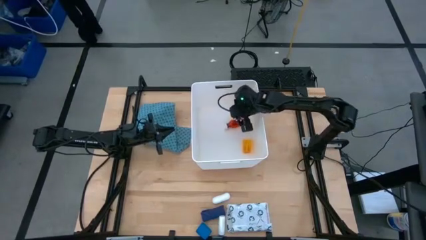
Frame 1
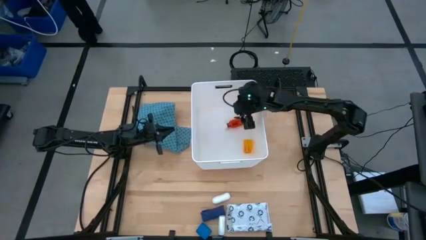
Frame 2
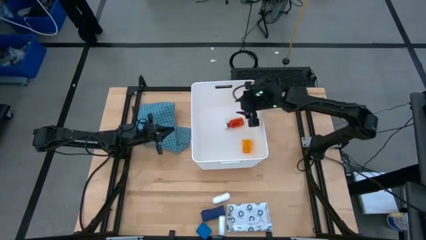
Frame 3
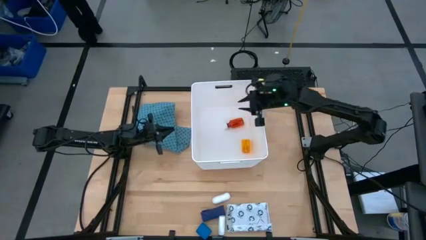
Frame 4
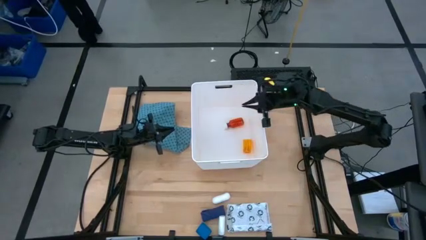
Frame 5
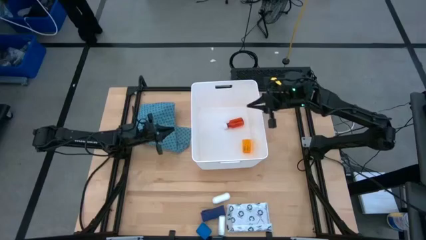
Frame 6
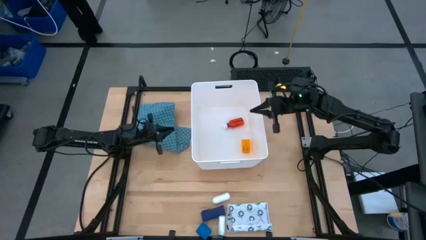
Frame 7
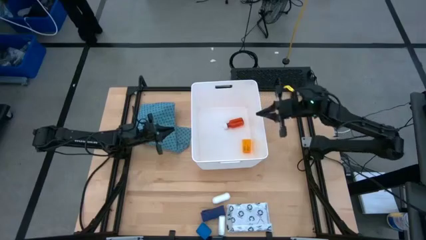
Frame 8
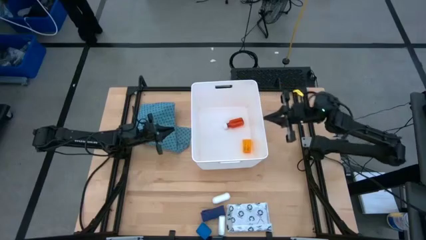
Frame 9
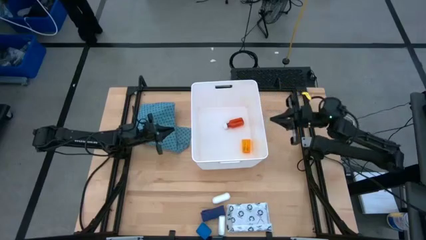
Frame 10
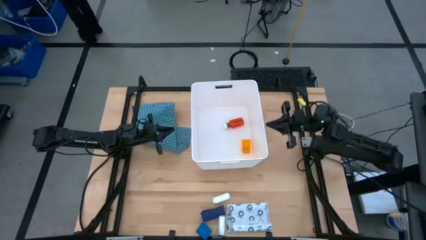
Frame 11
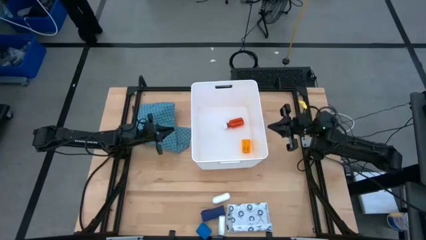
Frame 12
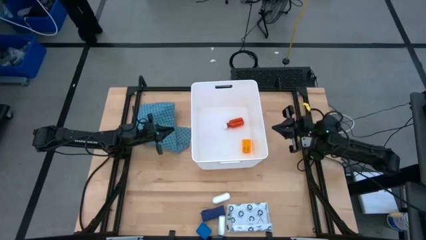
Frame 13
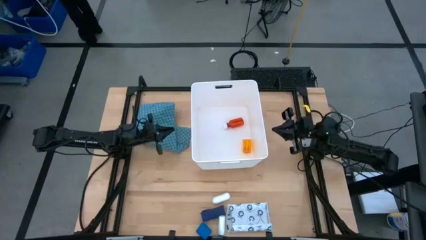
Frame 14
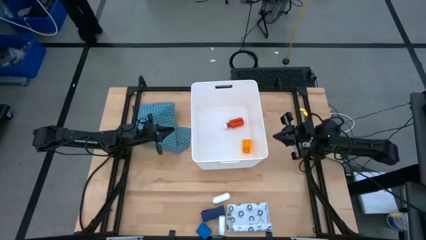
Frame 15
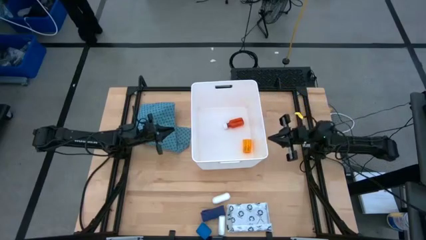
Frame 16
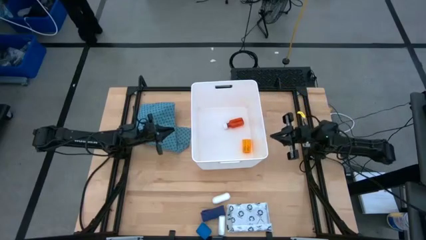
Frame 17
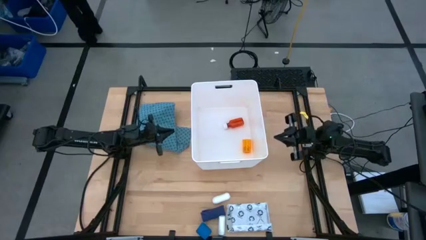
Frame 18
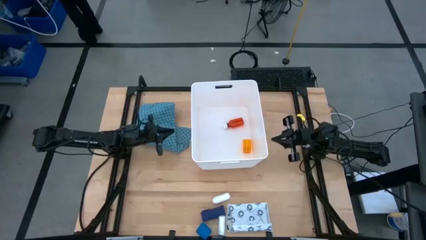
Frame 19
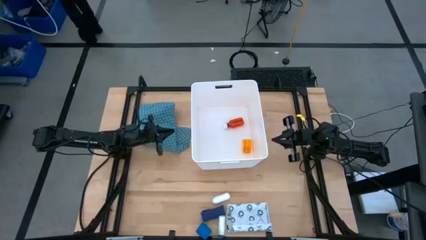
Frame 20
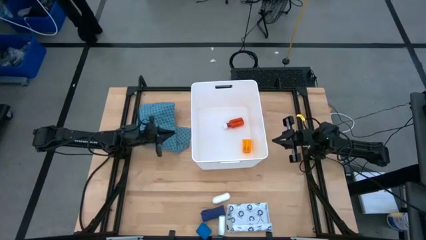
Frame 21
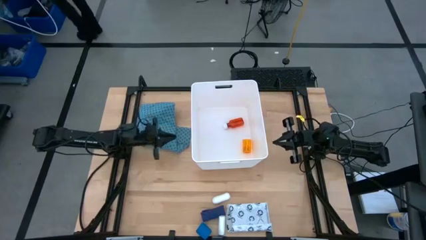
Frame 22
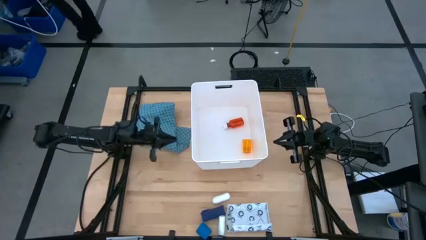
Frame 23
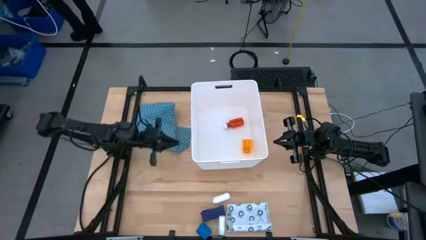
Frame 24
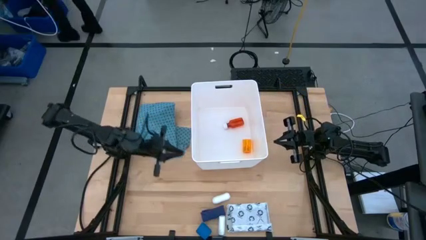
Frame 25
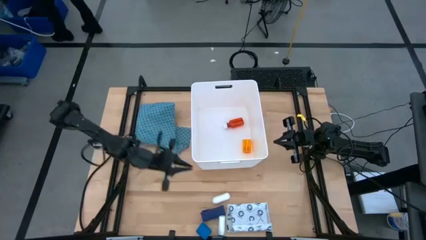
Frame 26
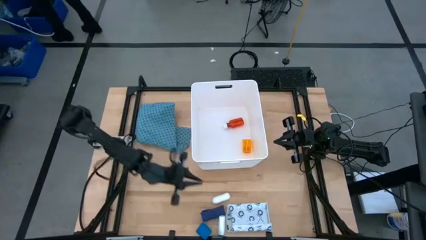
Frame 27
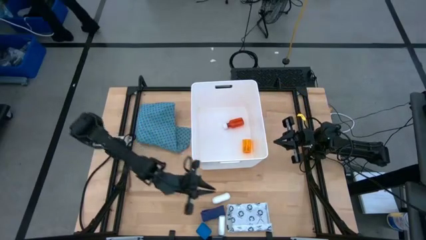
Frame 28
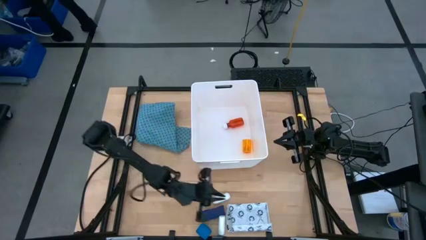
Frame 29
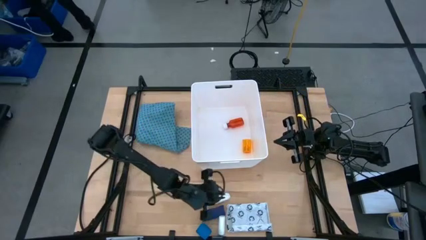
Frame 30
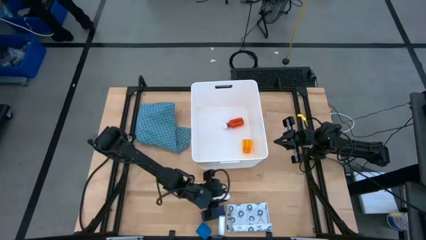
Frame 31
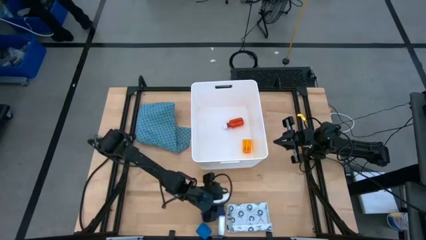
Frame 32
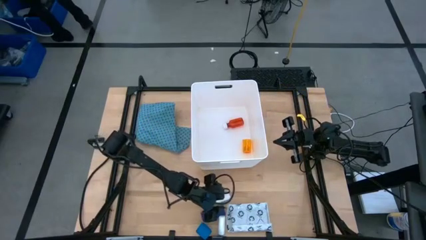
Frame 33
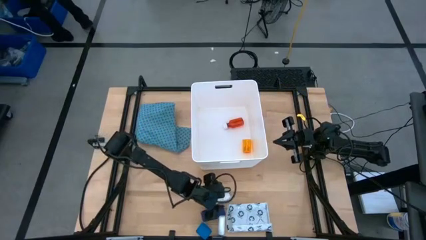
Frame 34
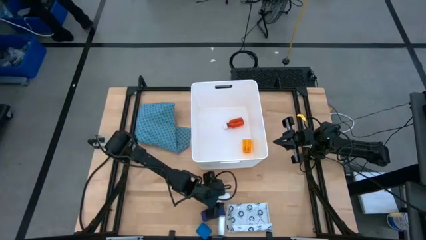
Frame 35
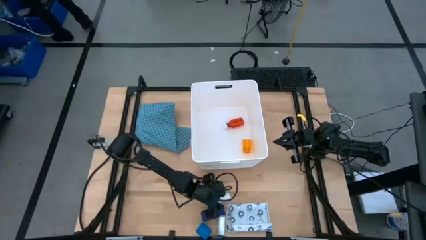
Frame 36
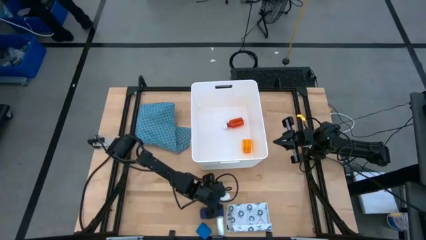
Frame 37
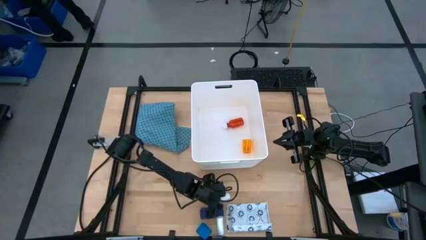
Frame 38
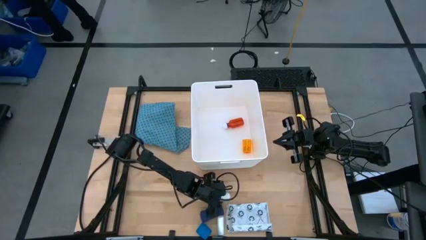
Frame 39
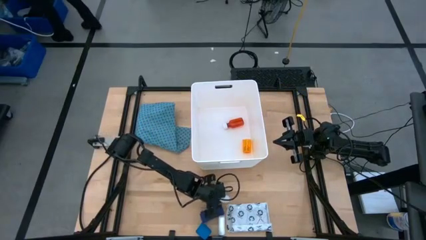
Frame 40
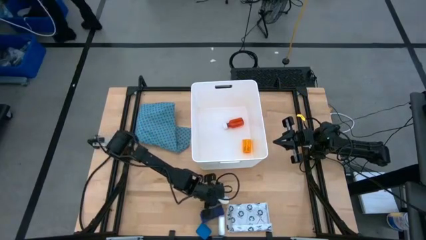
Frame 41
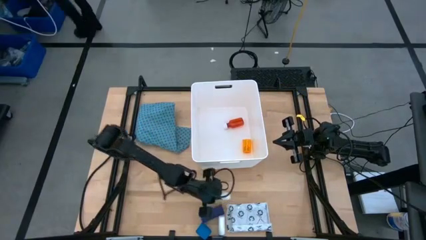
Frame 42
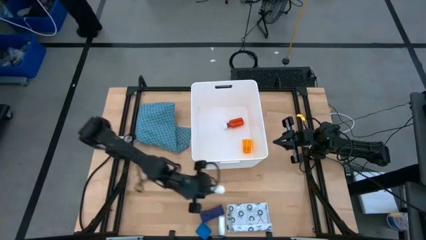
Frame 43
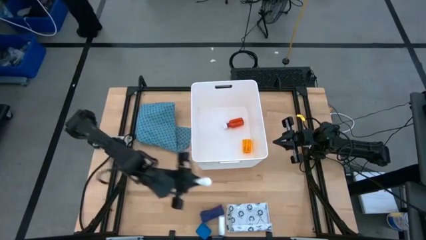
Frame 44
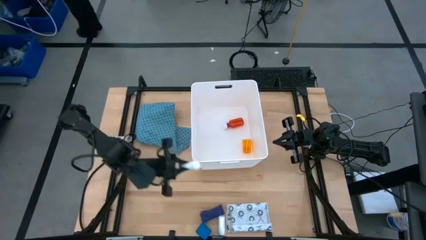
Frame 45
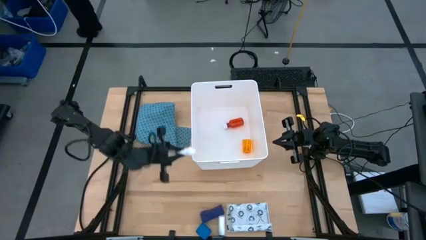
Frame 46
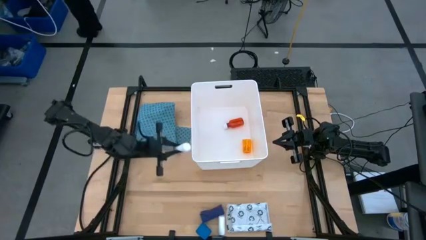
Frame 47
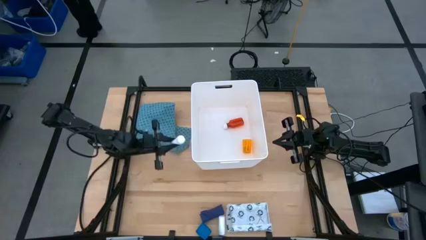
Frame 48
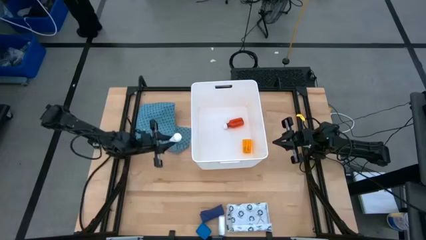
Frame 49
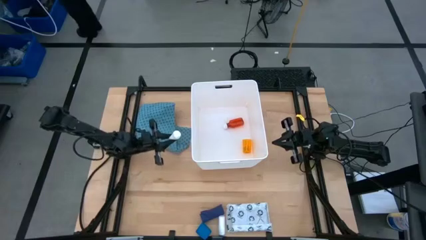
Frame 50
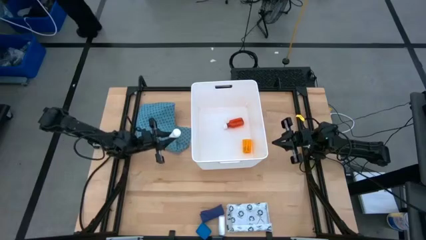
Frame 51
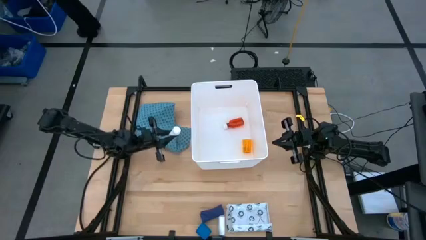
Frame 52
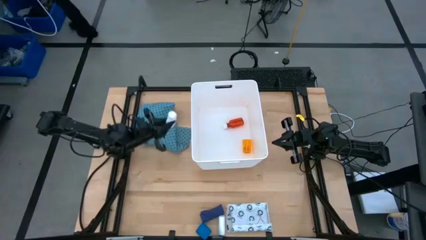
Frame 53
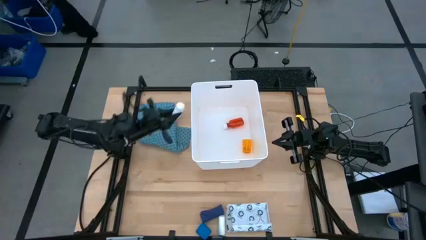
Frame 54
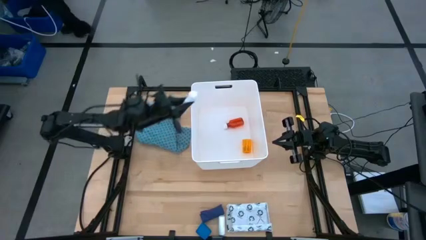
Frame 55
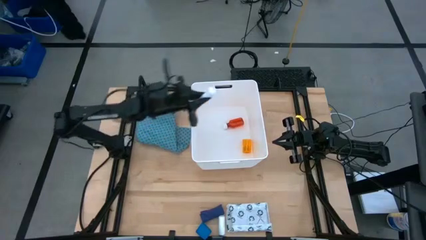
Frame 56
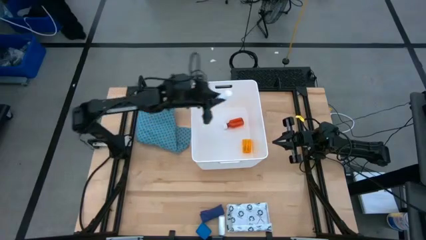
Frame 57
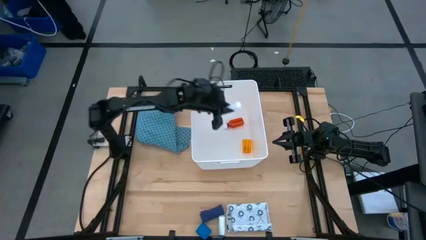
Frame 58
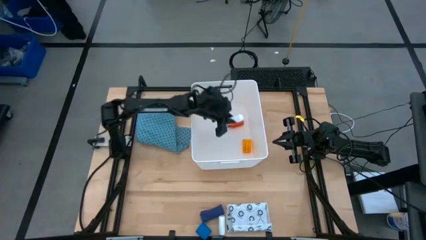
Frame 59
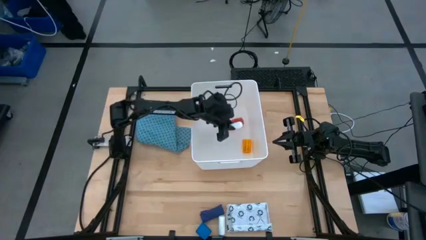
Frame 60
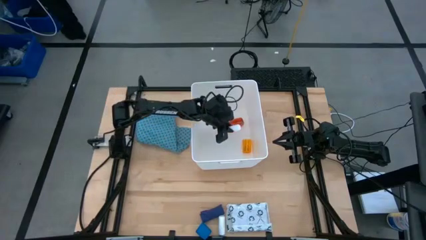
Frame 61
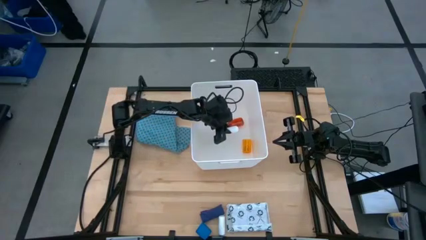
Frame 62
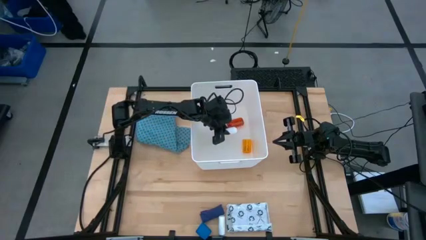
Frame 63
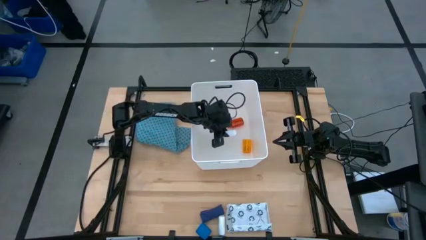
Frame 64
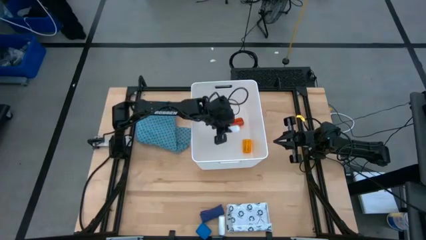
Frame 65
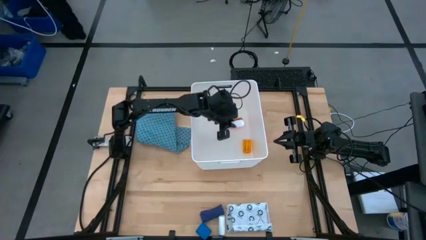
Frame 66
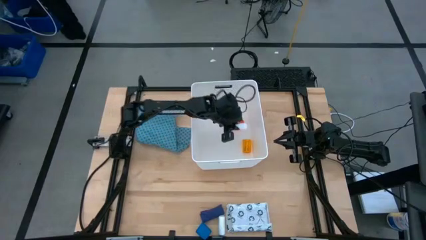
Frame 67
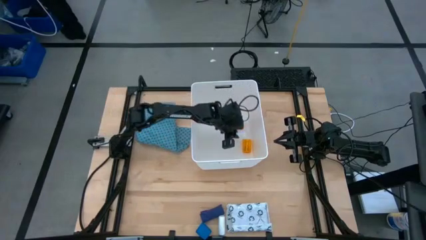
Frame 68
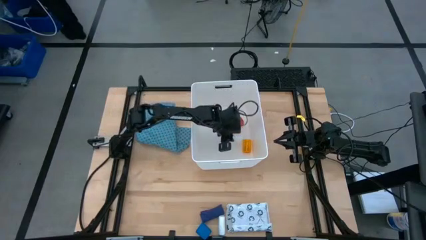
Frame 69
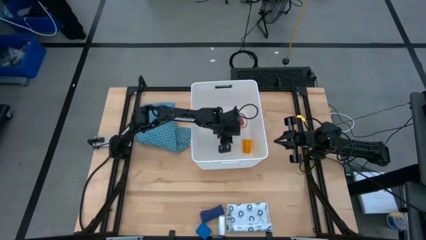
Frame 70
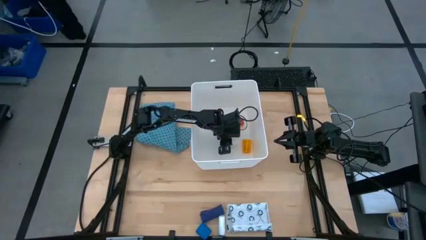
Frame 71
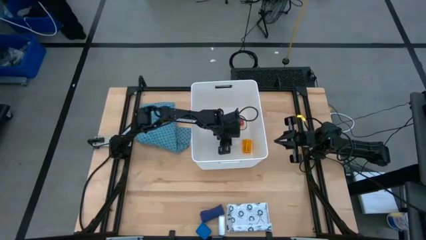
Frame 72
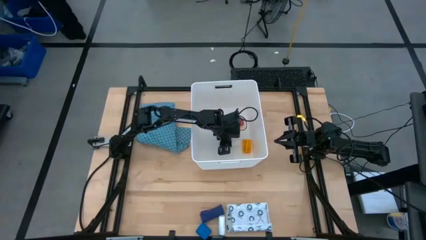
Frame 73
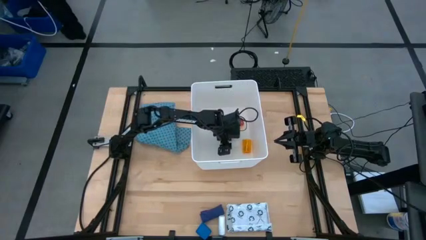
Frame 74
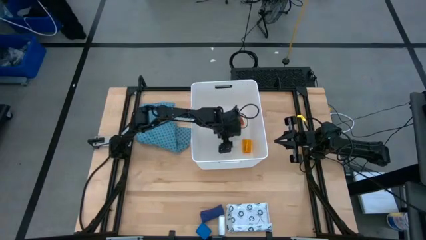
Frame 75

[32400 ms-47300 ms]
Task: Pick & place medical supplies in basket/bin
Put the top rolled gauze into the white bin
